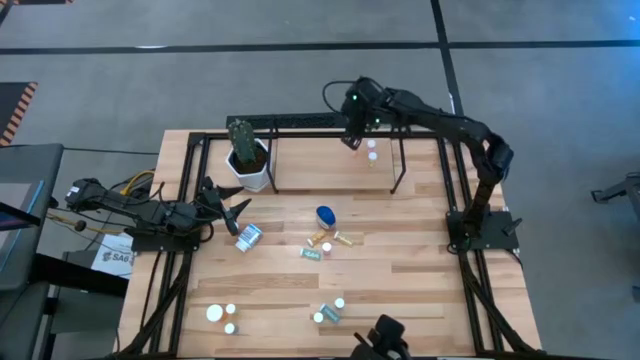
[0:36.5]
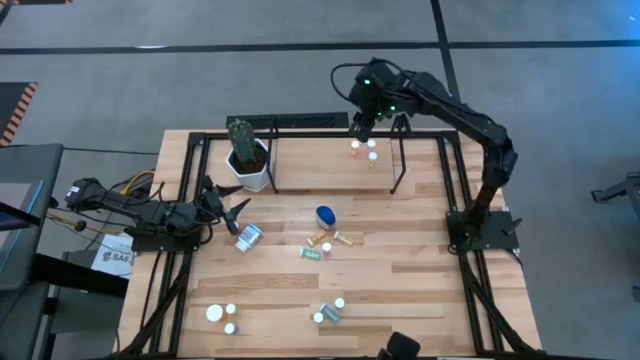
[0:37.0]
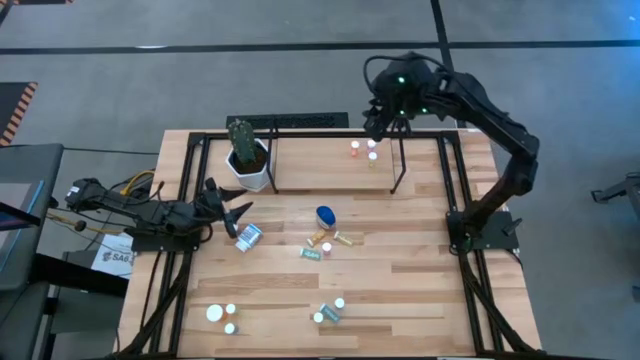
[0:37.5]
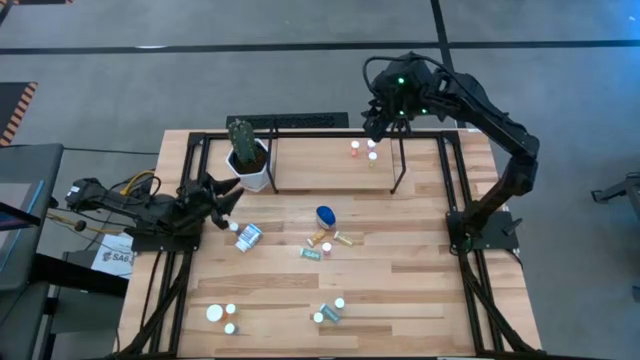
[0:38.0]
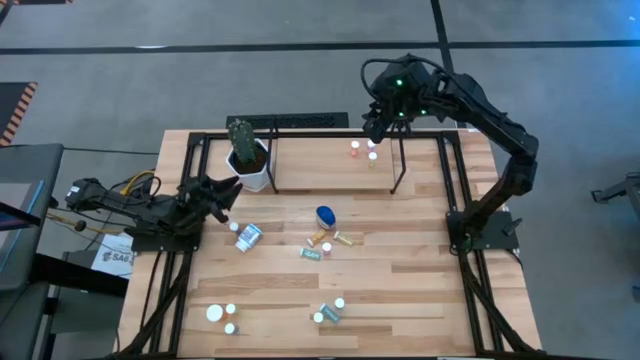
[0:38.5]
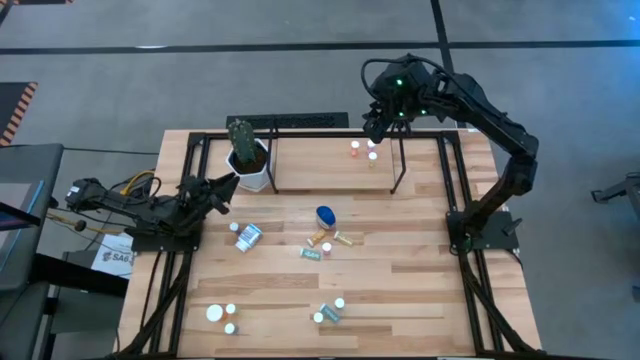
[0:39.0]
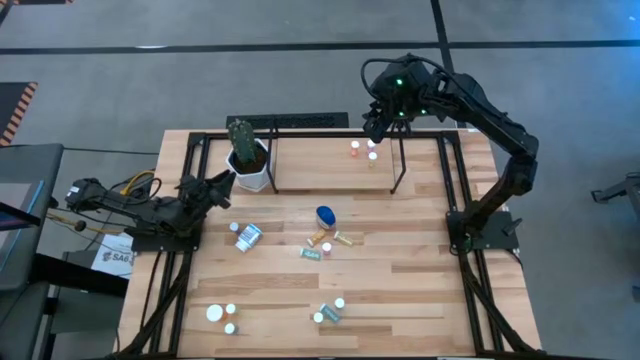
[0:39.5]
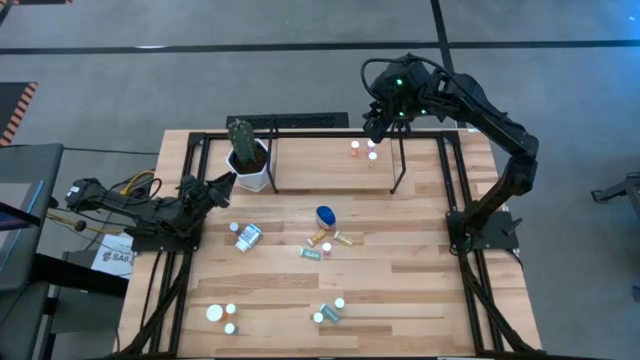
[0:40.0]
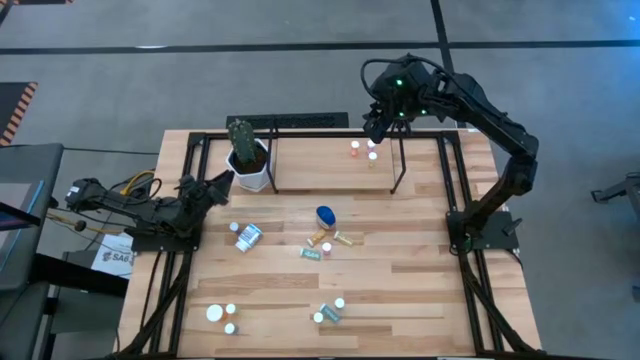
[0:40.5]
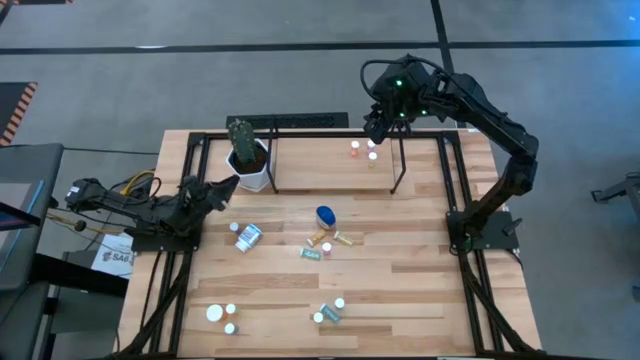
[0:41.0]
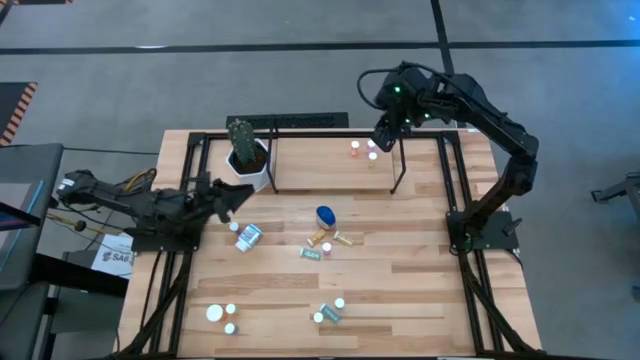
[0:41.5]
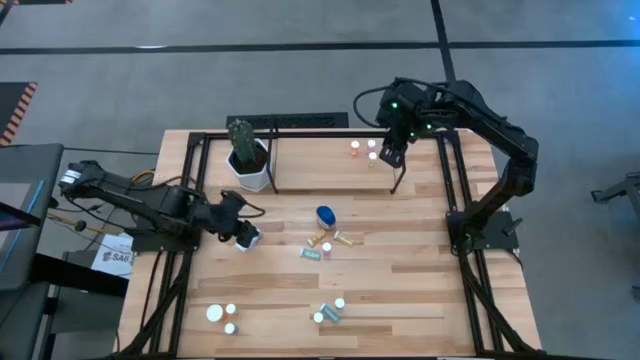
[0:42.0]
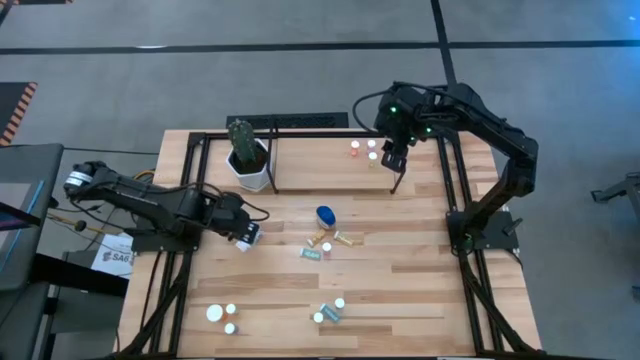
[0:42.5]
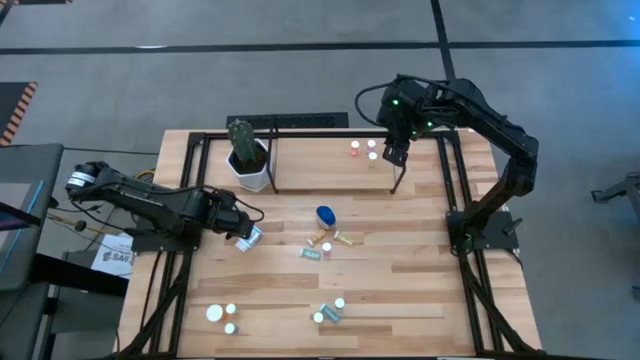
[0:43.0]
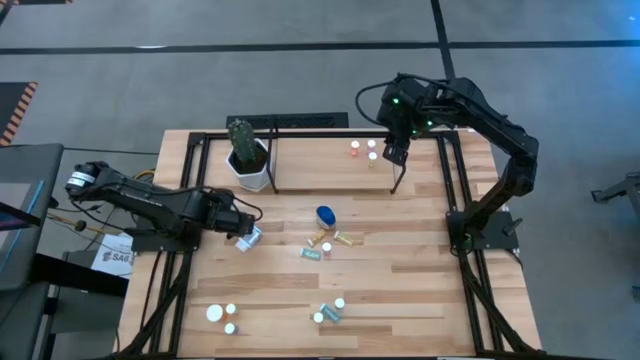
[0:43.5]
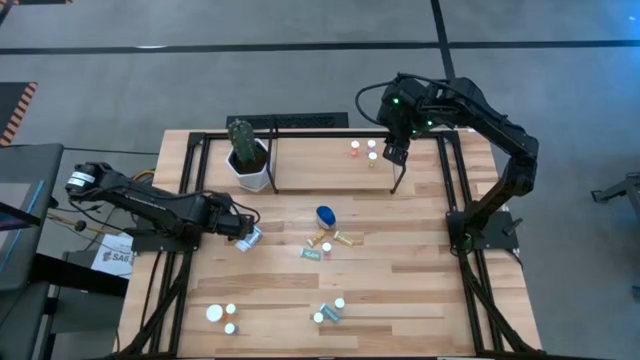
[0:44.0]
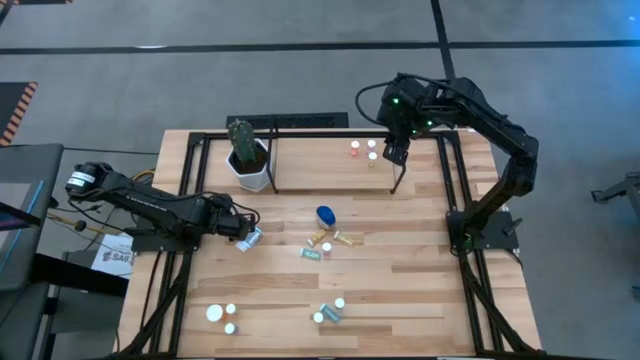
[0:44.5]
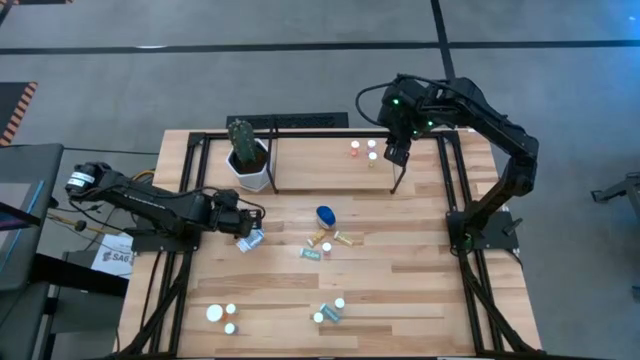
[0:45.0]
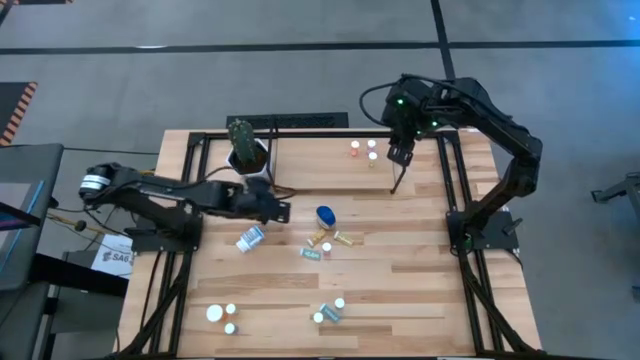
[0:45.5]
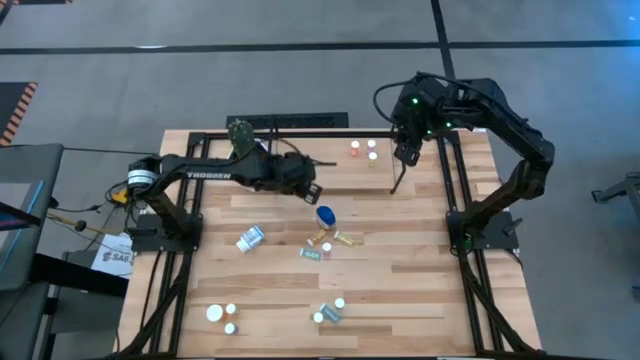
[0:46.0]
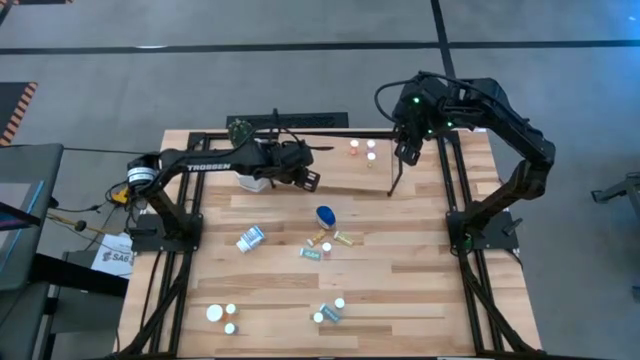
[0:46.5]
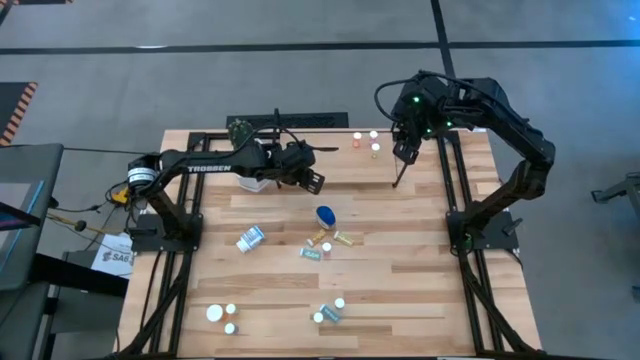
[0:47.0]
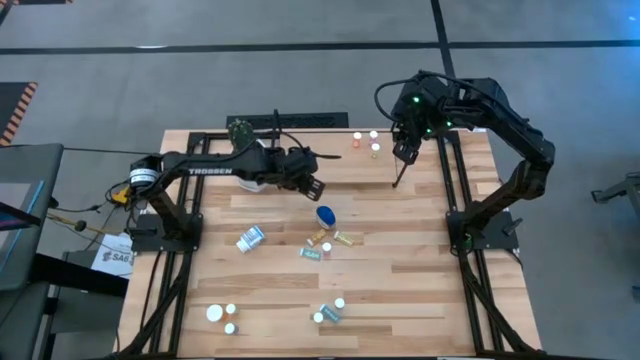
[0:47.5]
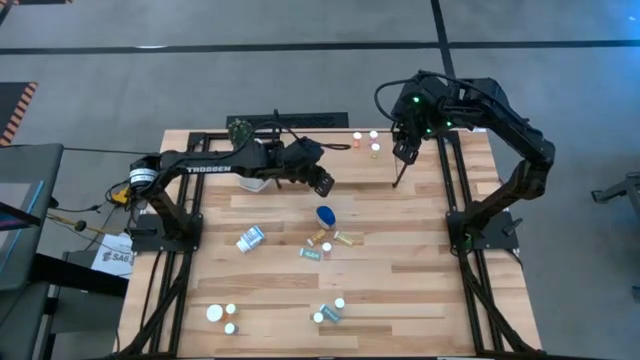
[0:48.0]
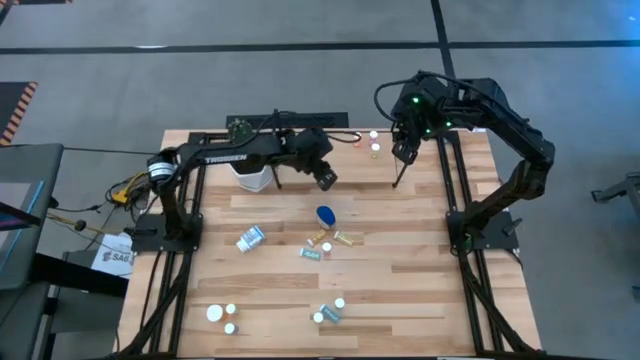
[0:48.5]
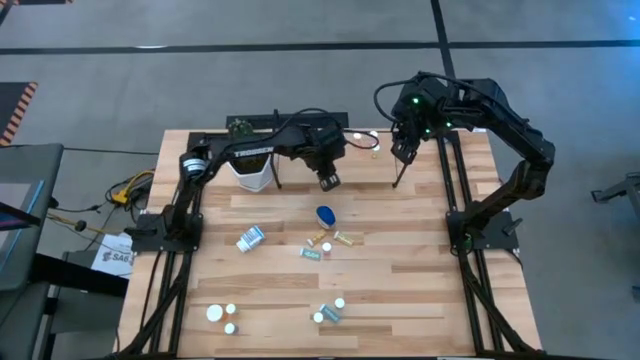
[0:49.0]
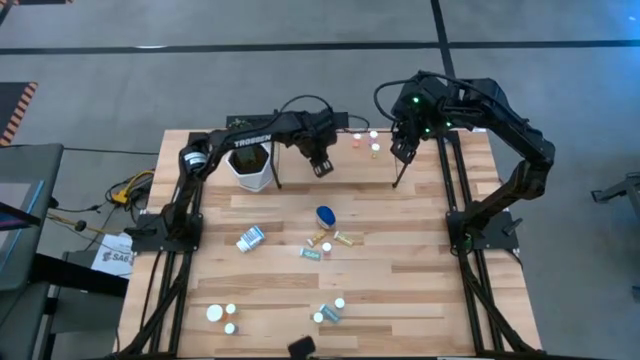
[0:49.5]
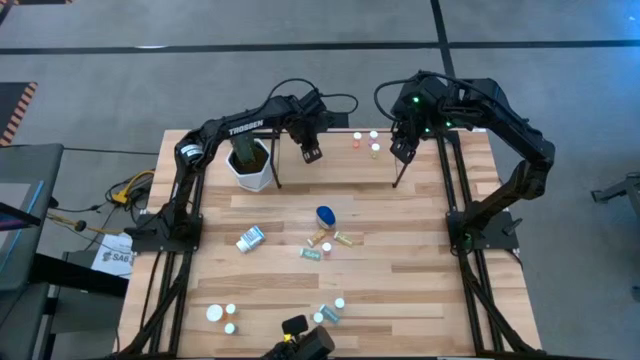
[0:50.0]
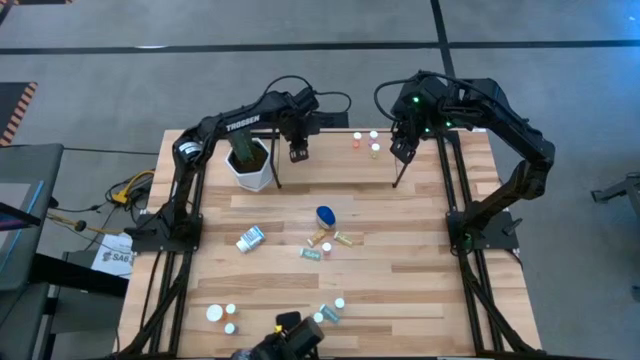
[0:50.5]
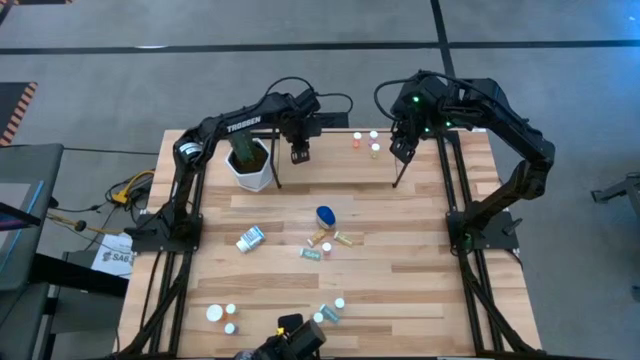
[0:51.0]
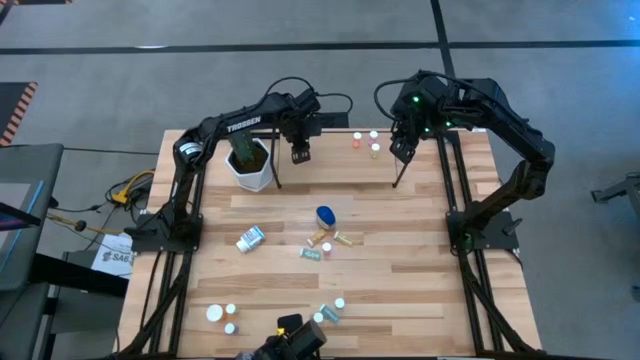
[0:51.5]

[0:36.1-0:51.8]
Task: Pick and place medicine bottles onto shelf by color
Put the small blue pill bottle on the shelf

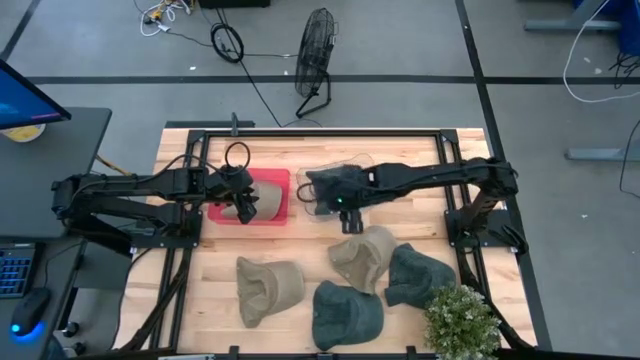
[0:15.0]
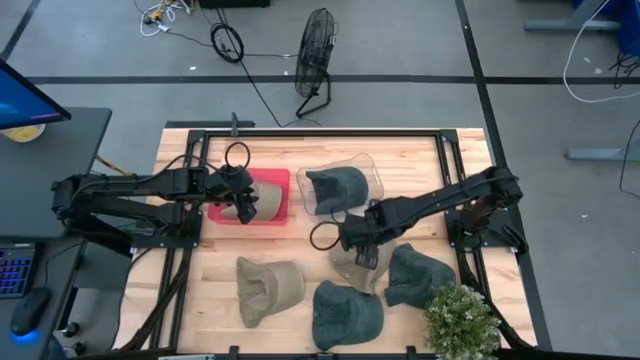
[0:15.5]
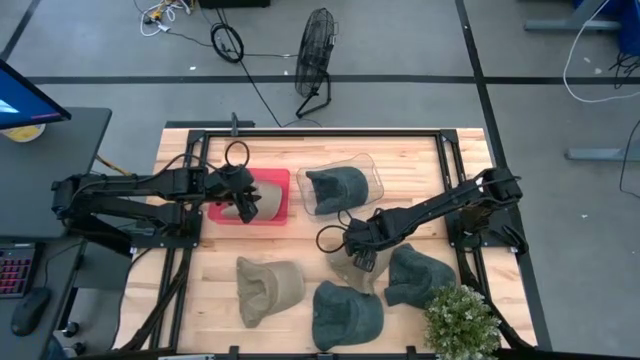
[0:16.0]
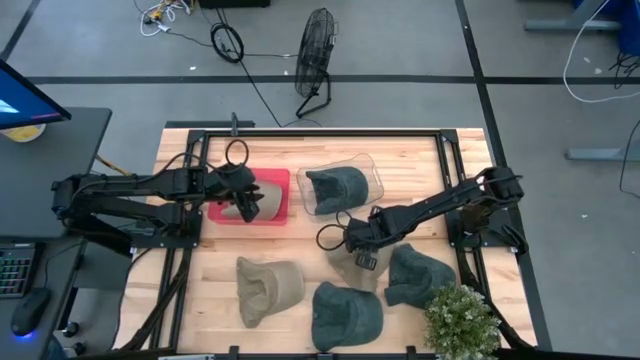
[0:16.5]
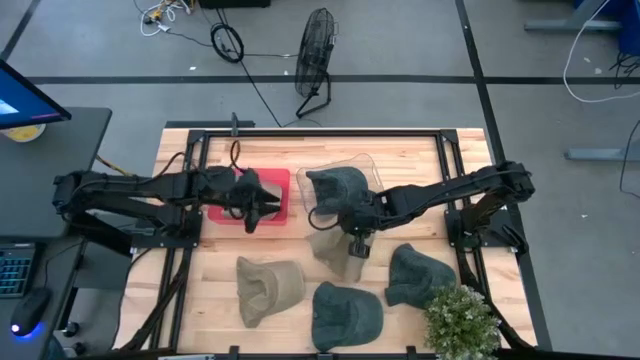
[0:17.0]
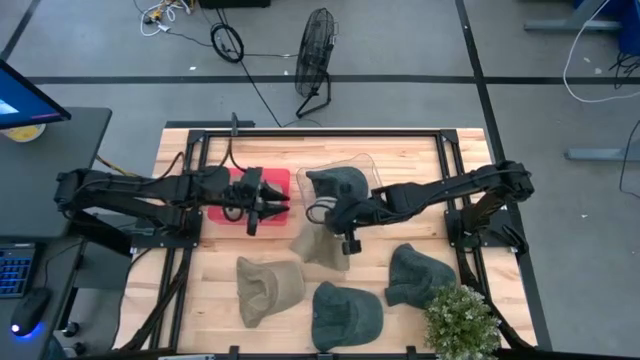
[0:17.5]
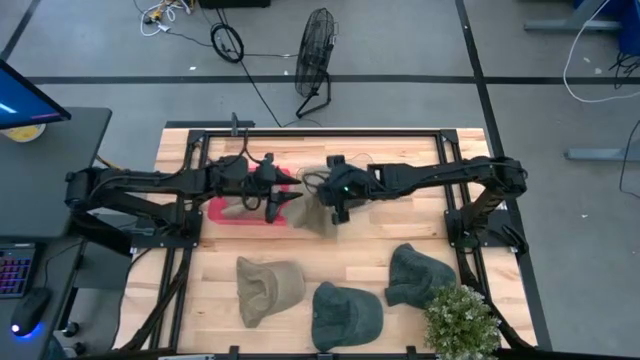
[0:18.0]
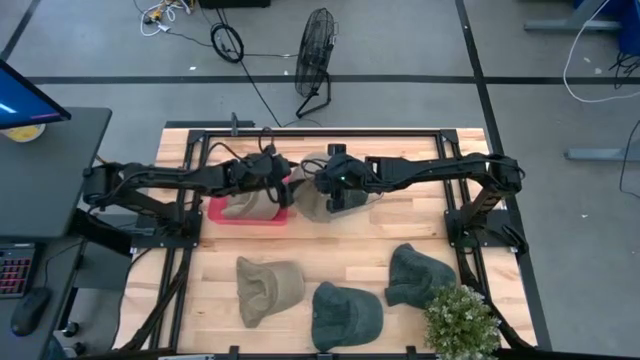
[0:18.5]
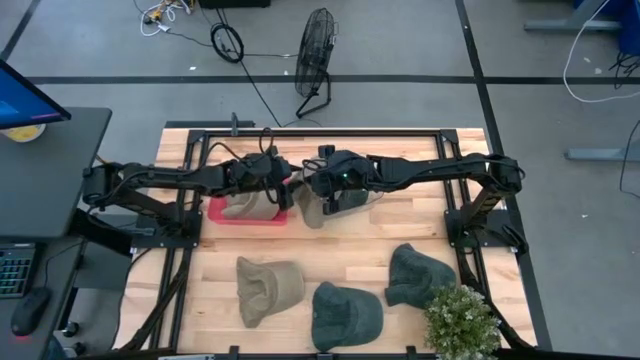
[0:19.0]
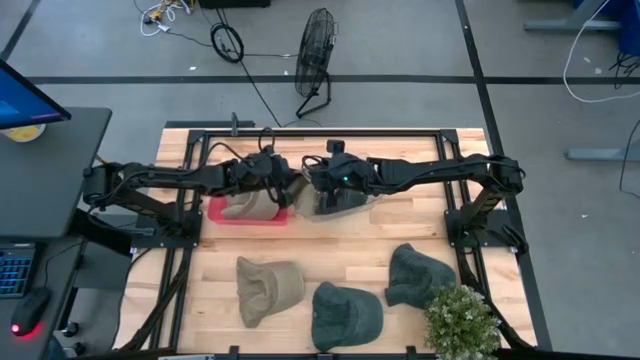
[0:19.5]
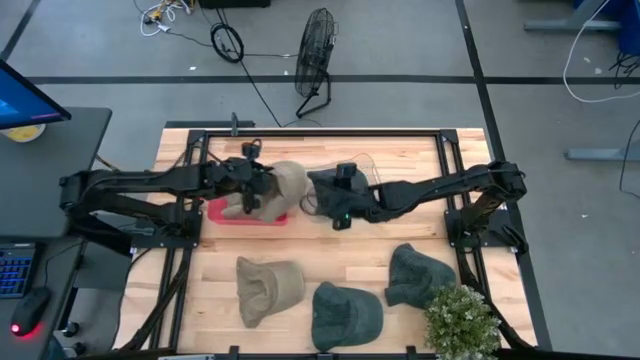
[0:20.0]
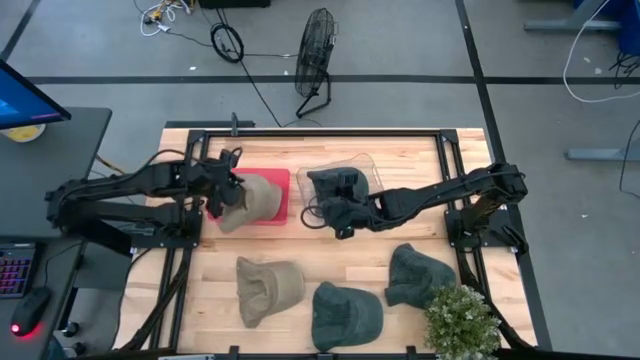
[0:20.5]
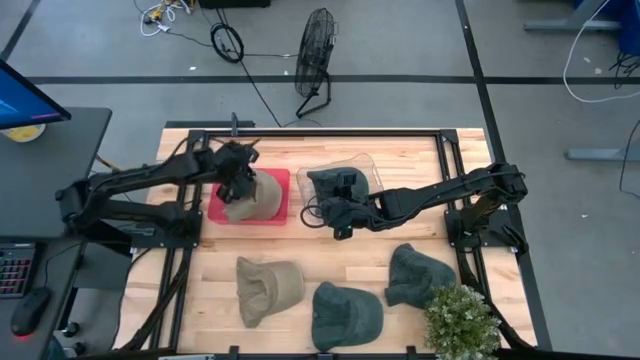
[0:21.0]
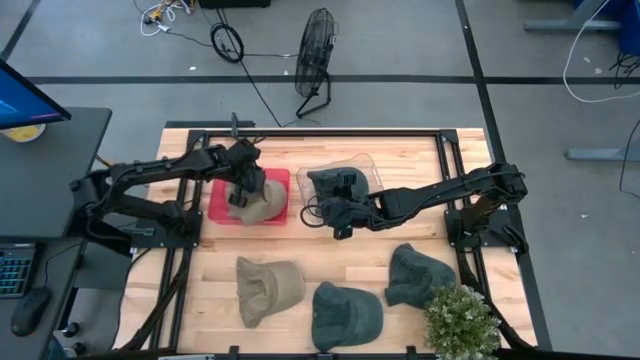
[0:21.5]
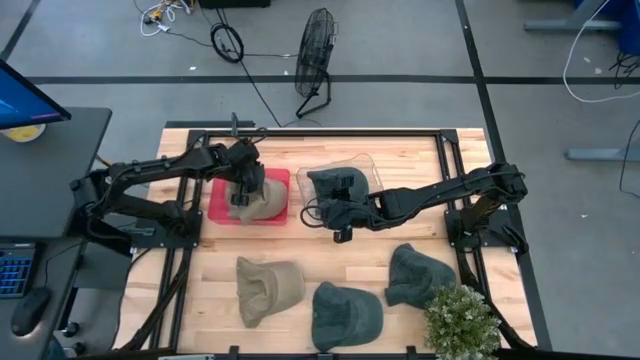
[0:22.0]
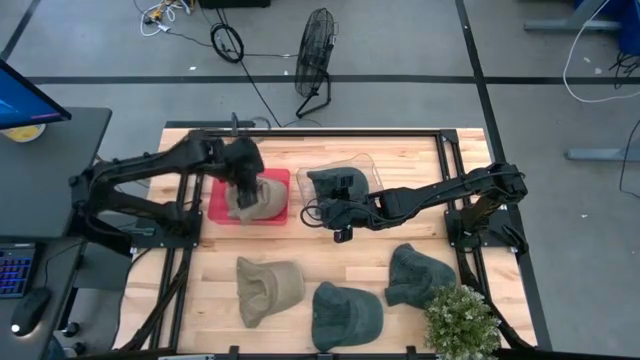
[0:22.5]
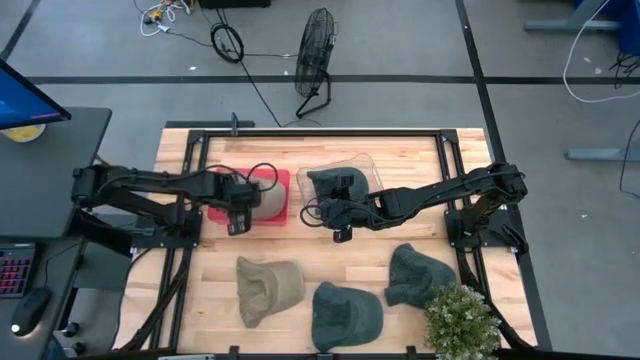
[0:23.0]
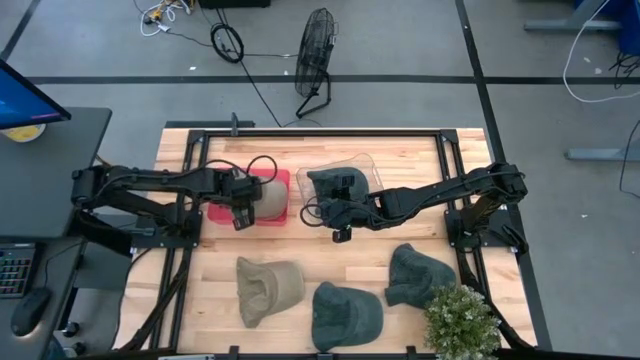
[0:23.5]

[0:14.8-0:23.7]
Task: Pick & Place hat
Put the right brown cap into the red bin
